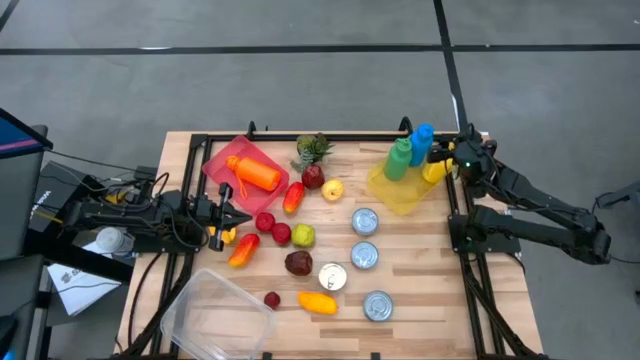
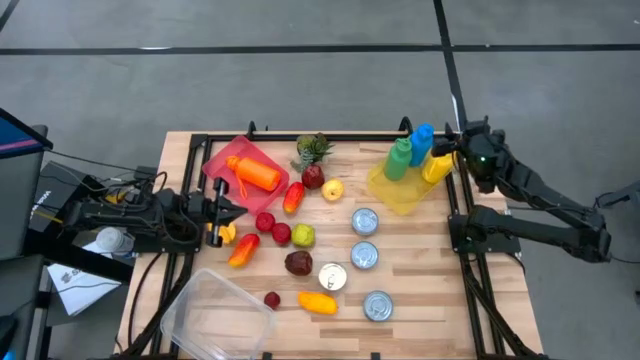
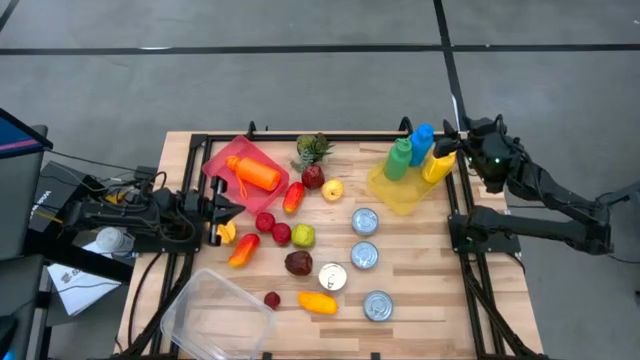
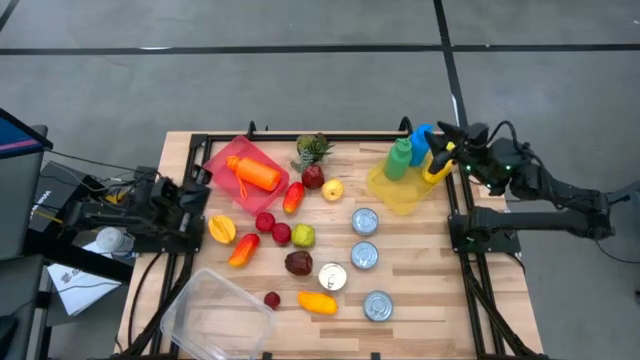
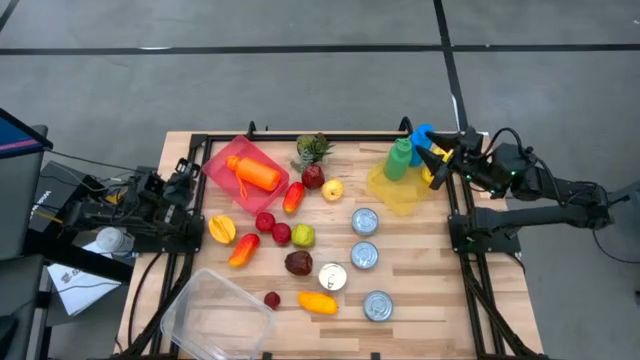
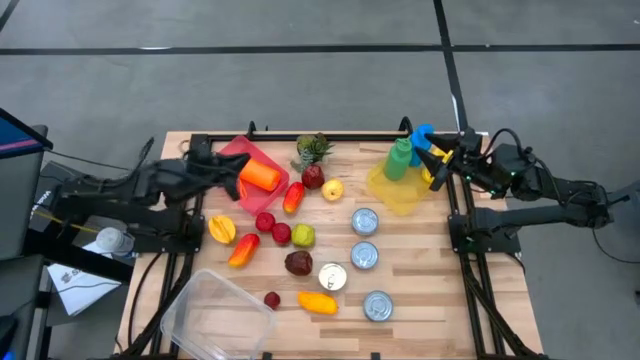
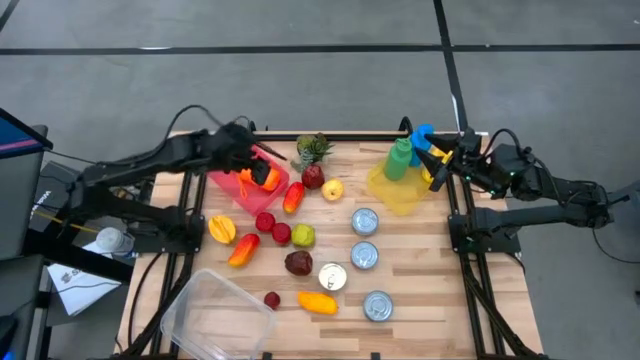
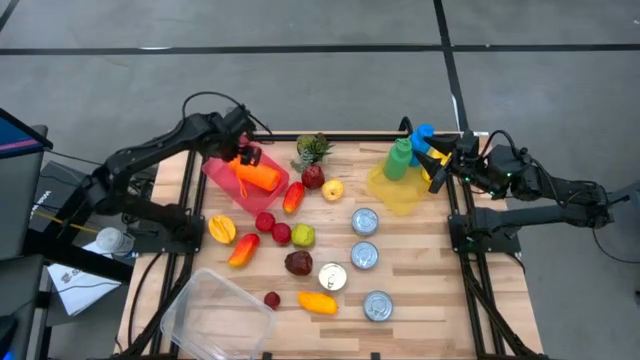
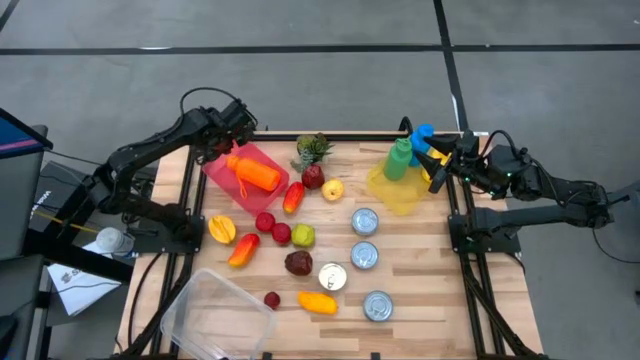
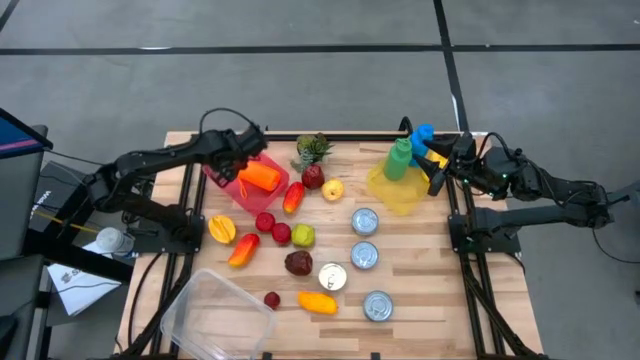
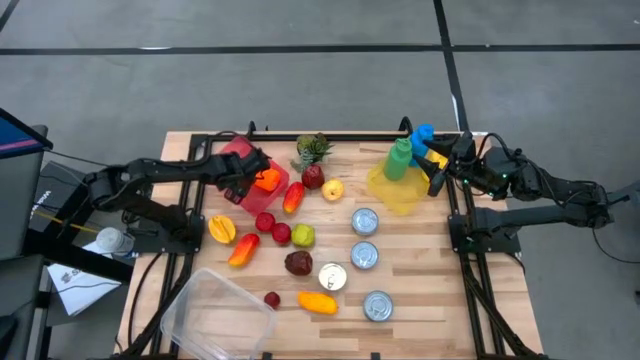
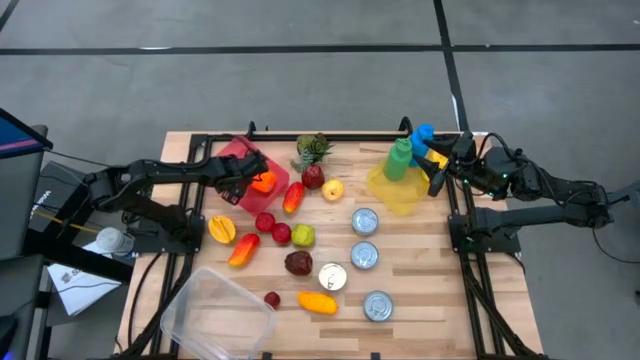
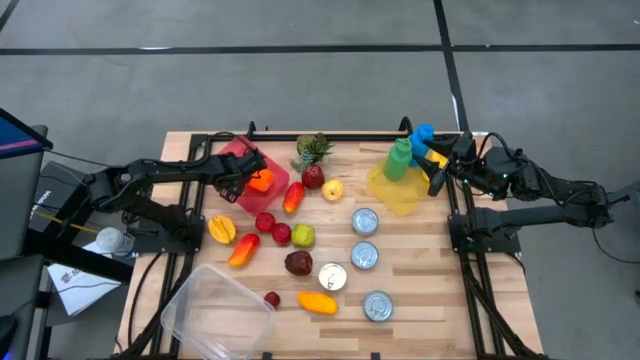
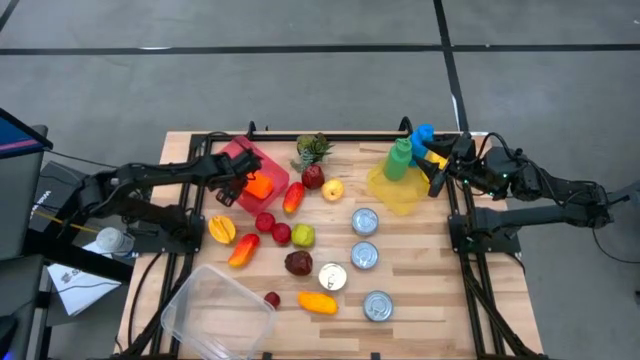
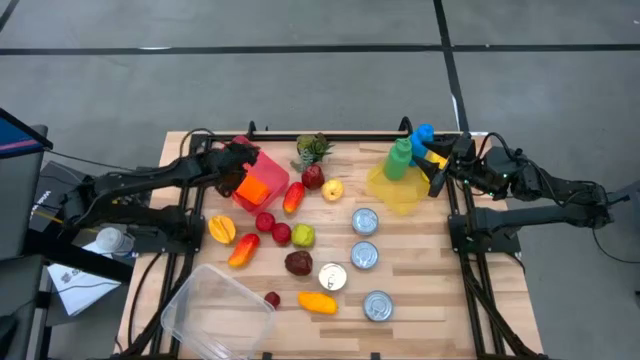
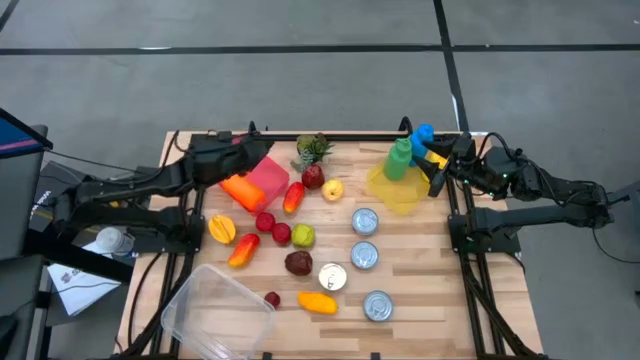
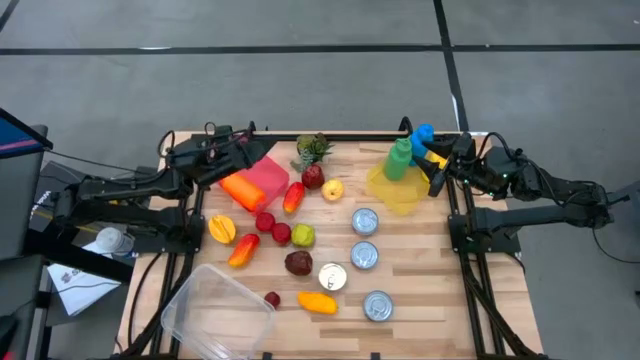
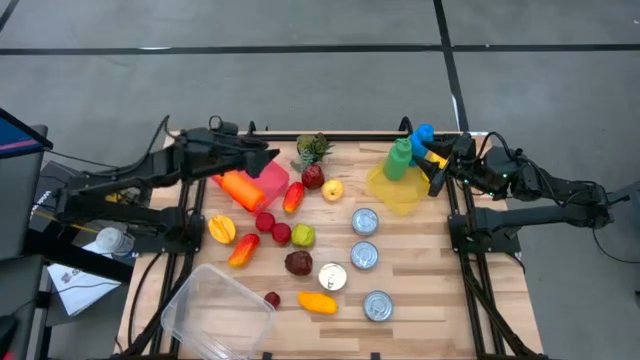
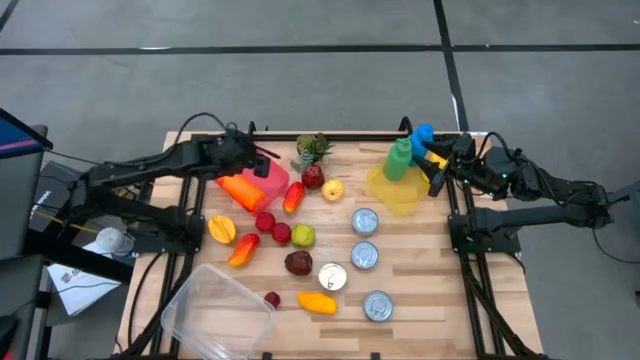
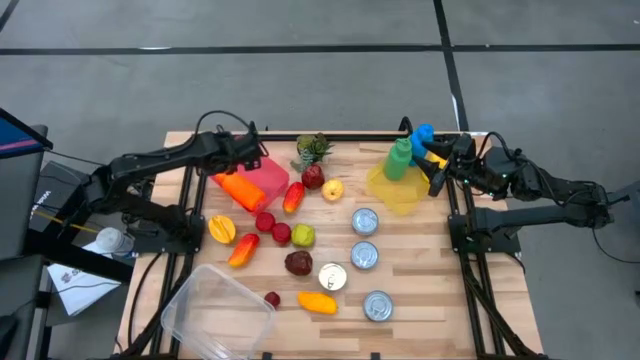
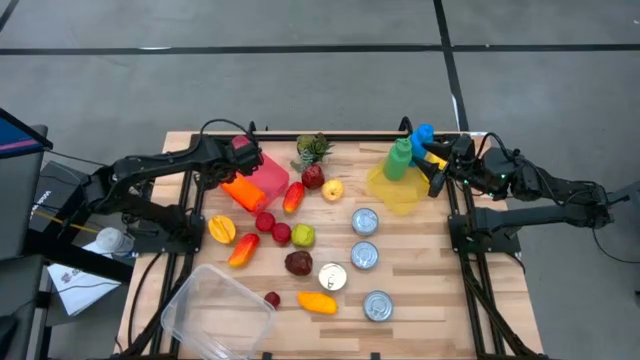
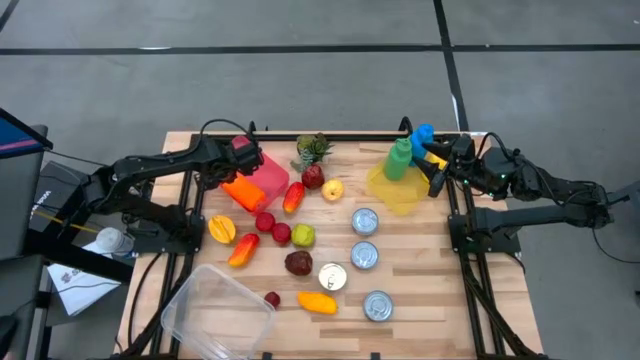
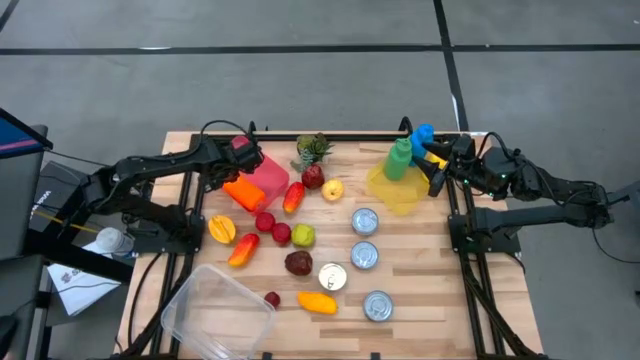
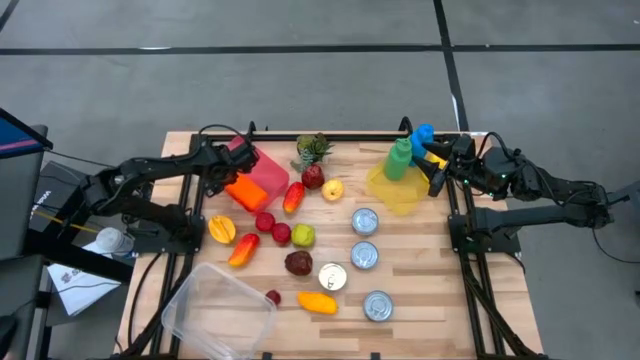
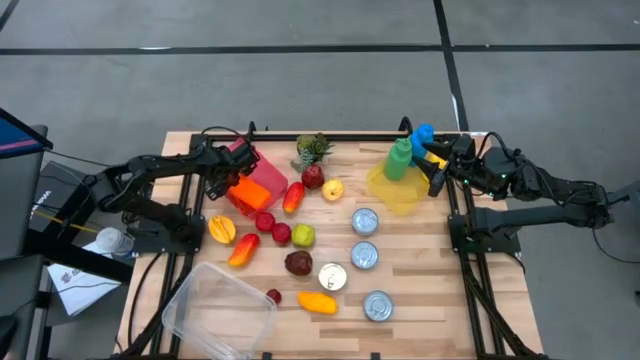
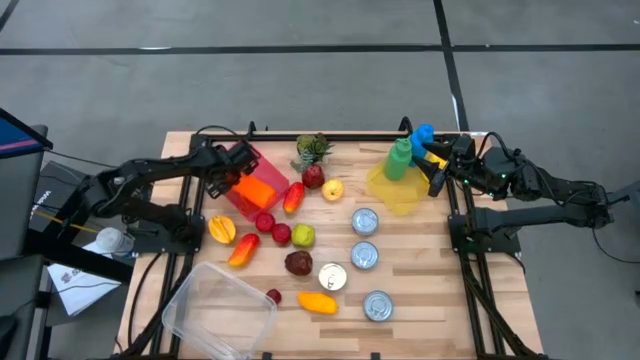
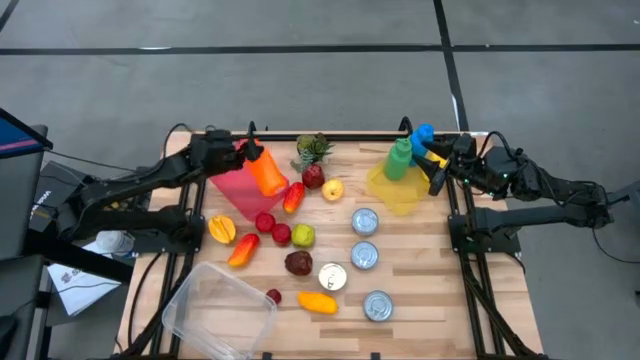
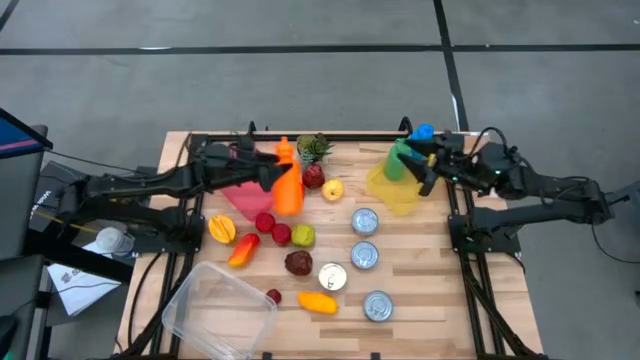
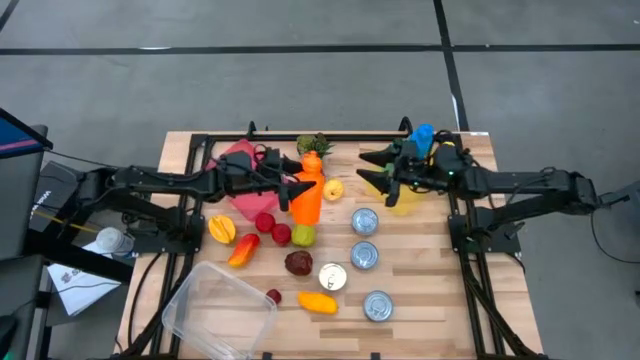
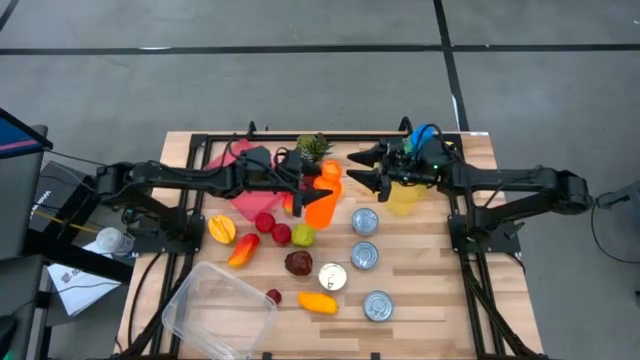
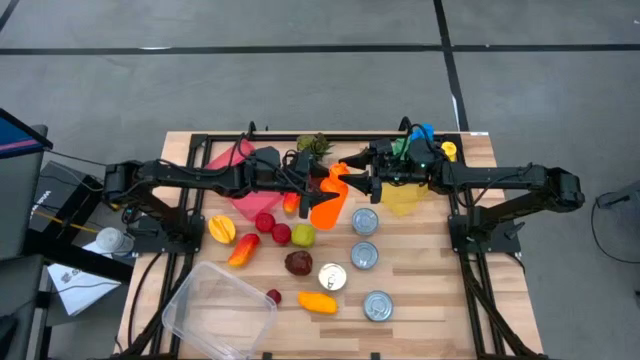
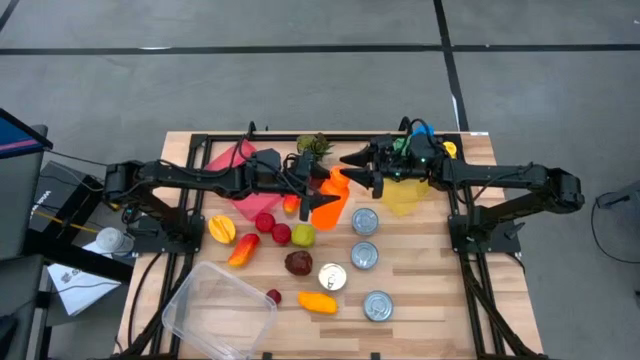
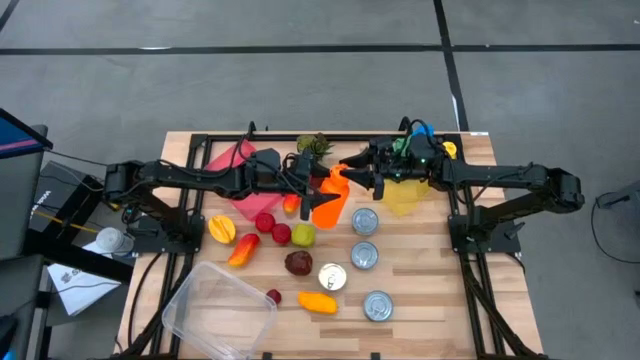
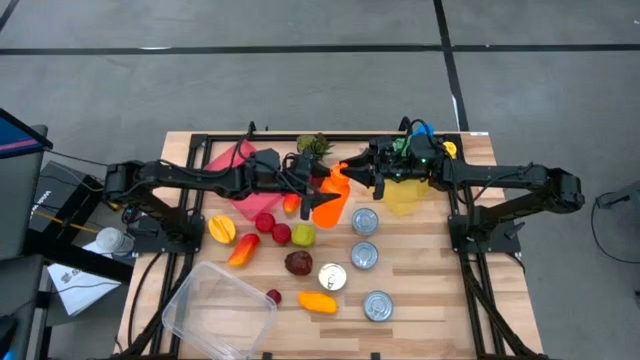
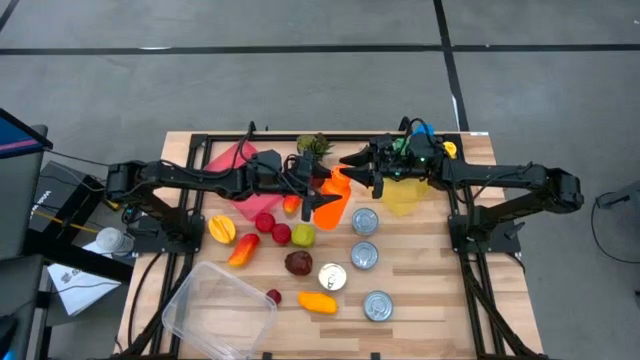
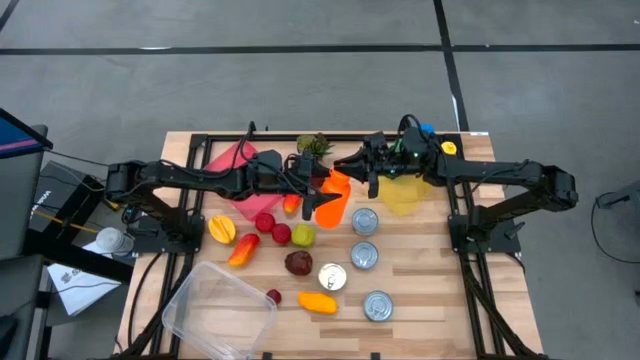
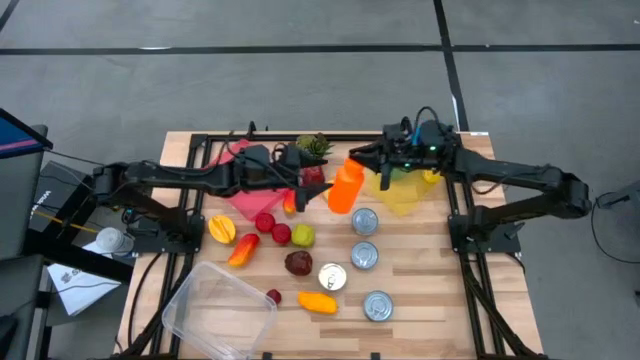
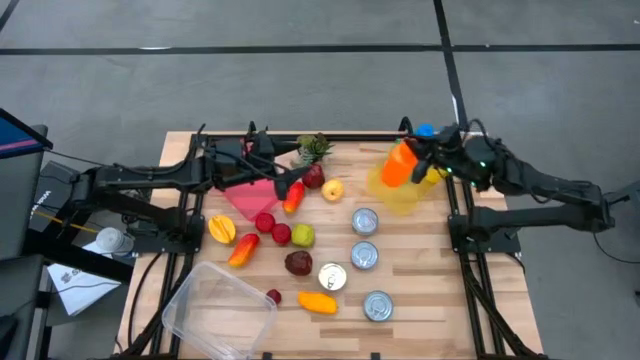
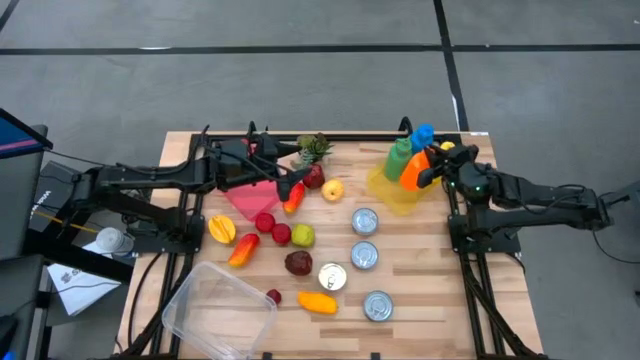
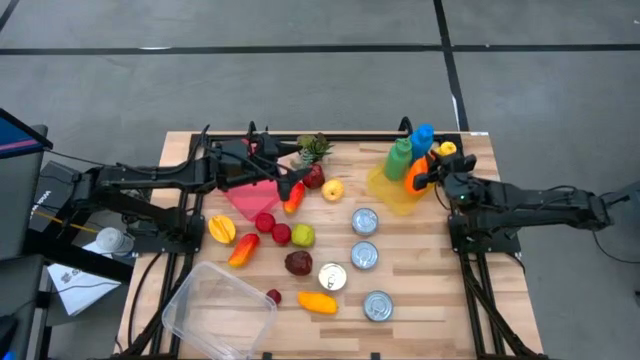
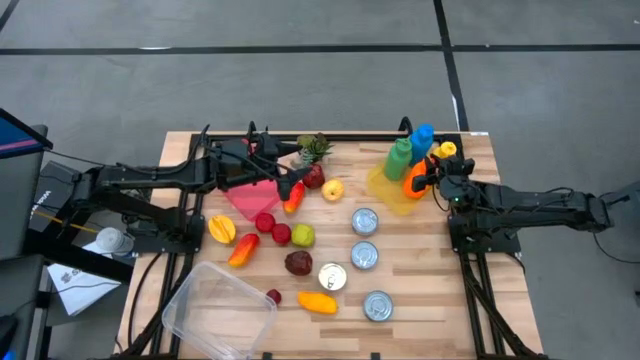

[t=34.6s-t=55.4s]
Task: Pick & Place Food Item
Put the orange tumbler into the yellow bin
